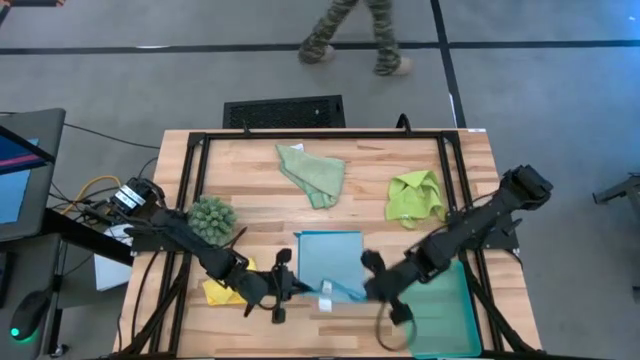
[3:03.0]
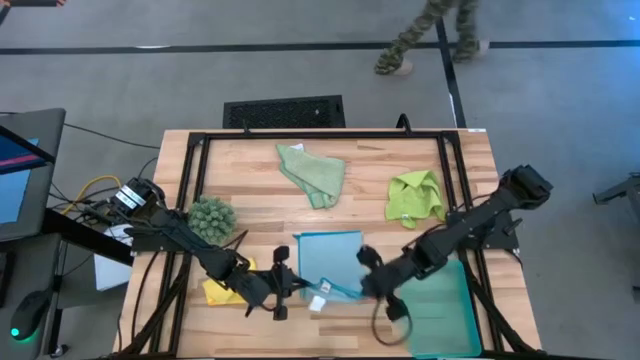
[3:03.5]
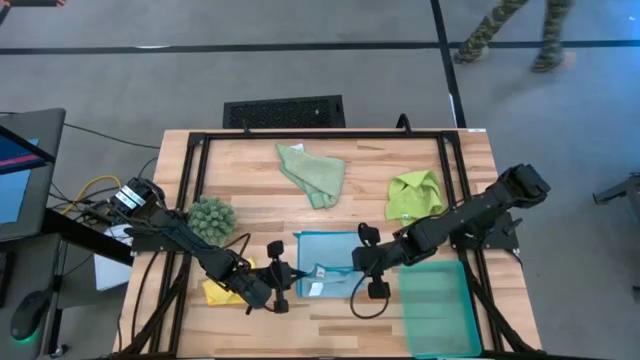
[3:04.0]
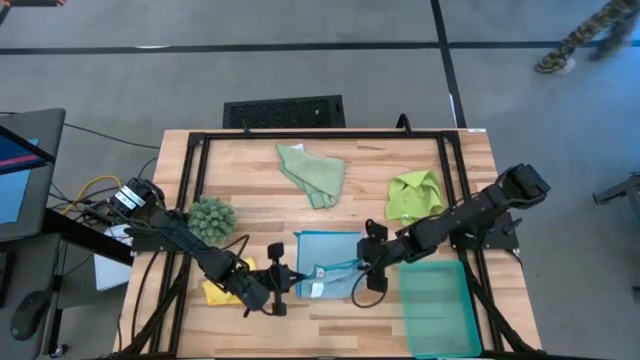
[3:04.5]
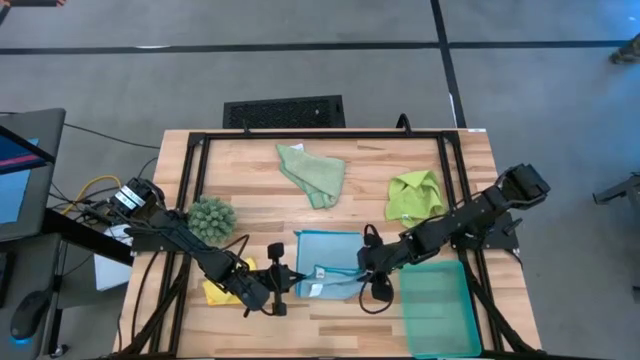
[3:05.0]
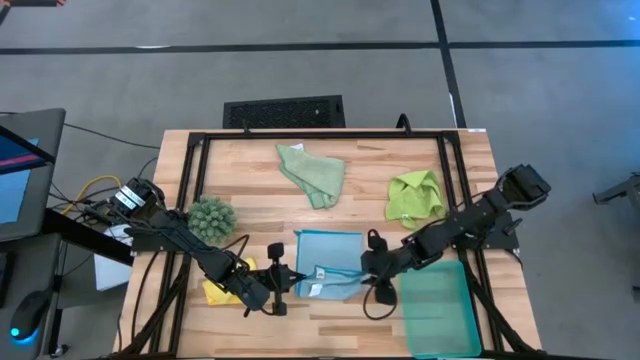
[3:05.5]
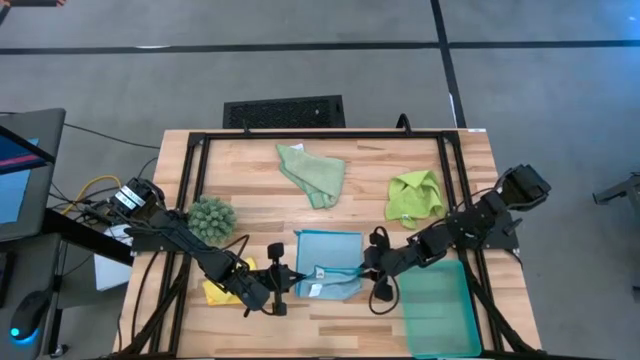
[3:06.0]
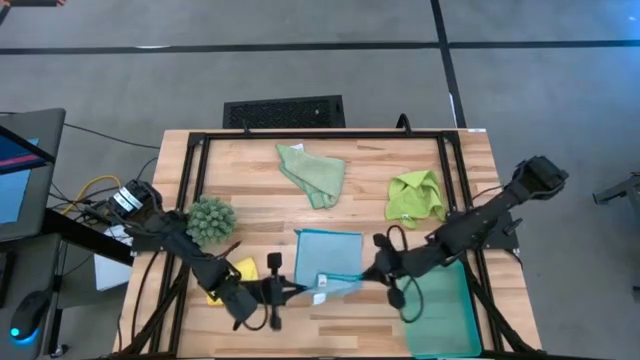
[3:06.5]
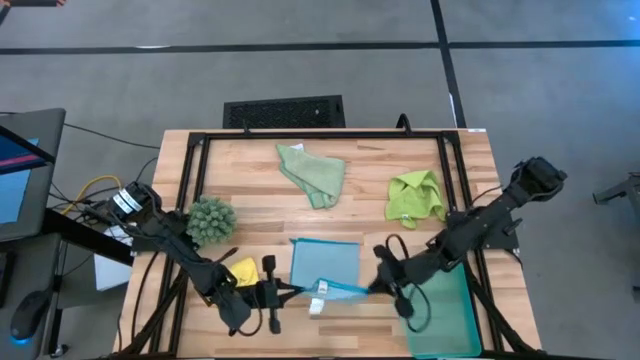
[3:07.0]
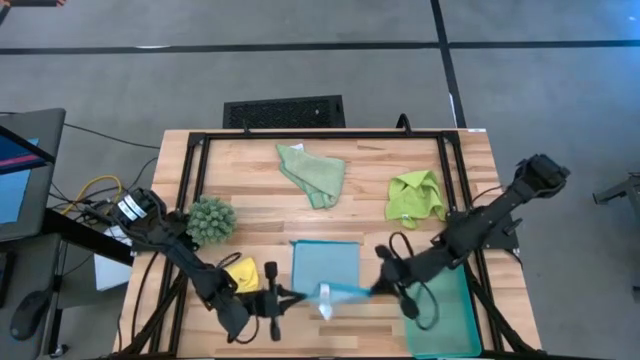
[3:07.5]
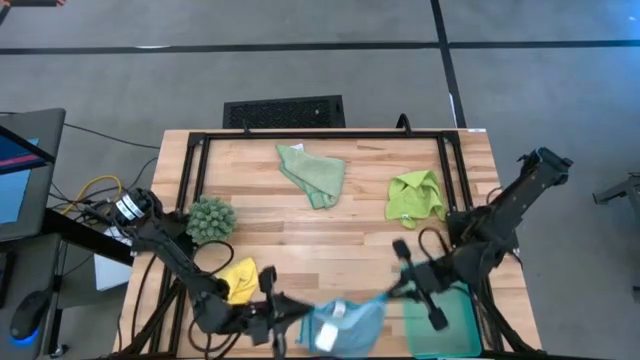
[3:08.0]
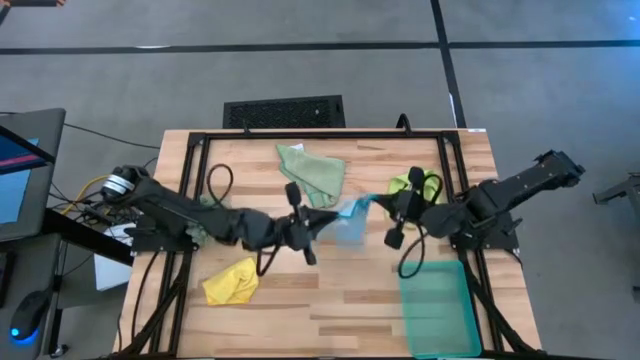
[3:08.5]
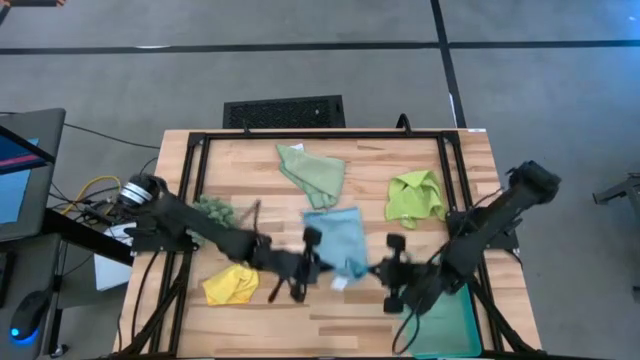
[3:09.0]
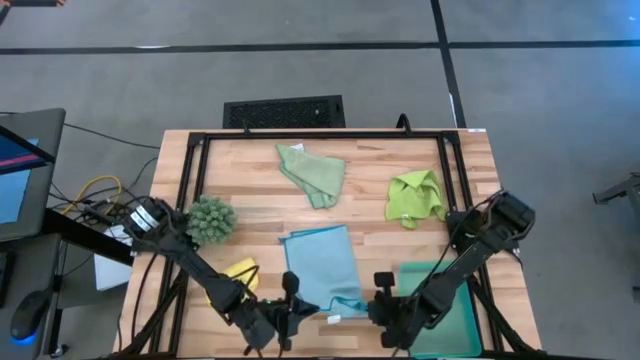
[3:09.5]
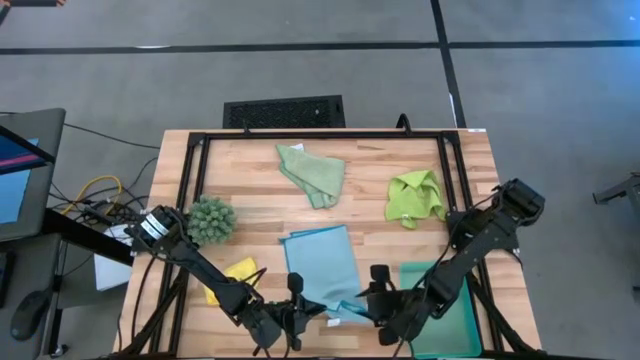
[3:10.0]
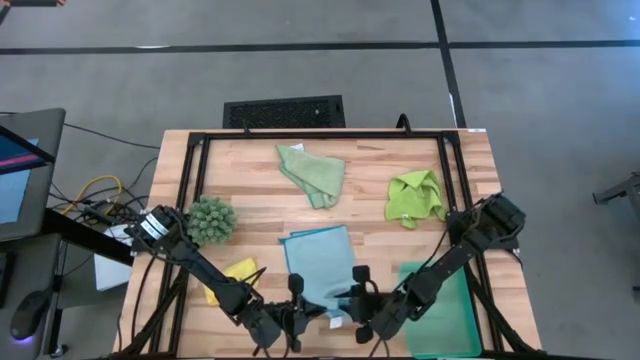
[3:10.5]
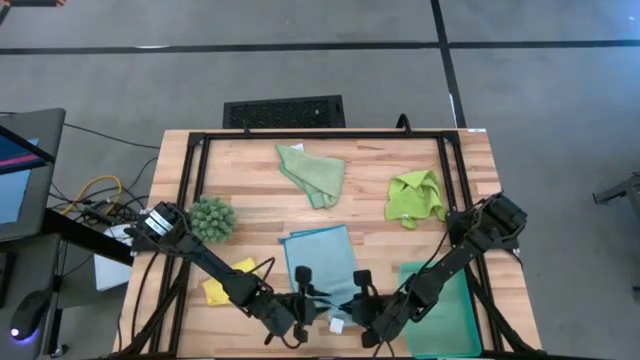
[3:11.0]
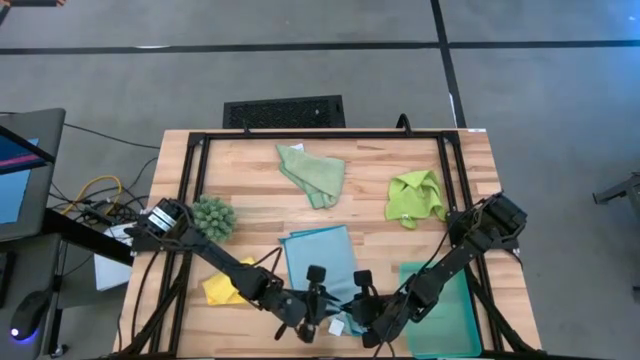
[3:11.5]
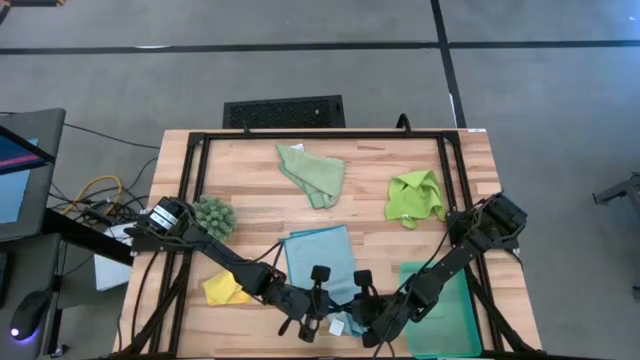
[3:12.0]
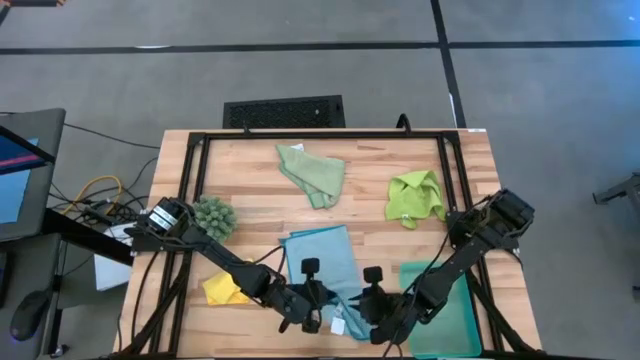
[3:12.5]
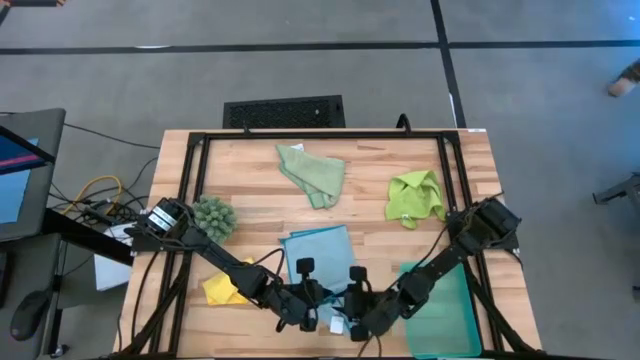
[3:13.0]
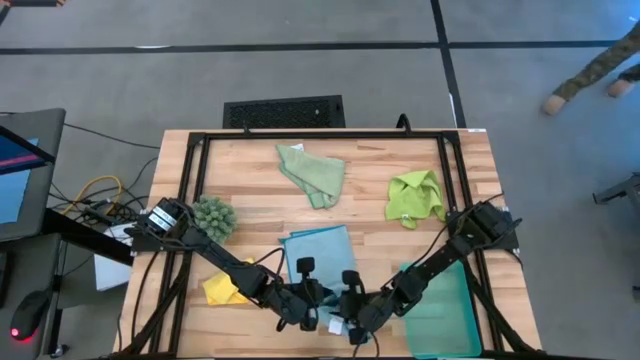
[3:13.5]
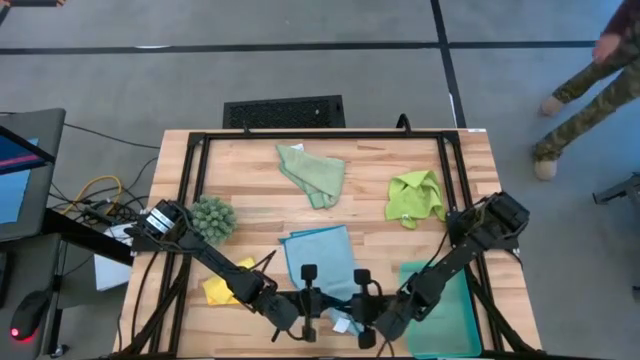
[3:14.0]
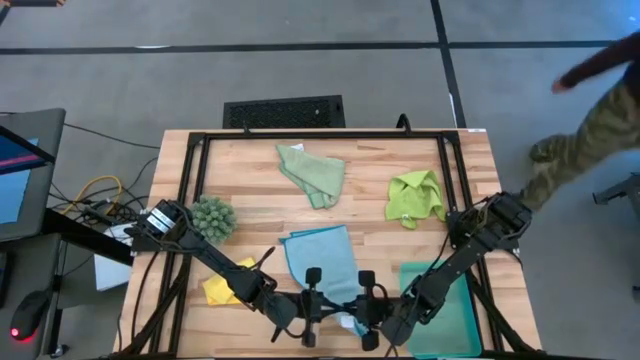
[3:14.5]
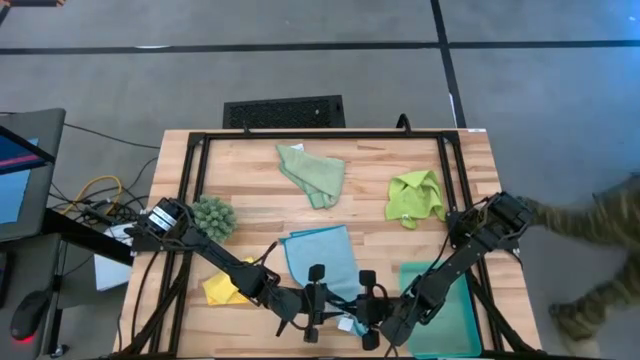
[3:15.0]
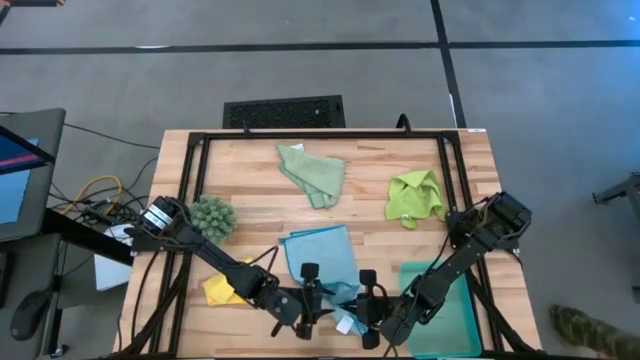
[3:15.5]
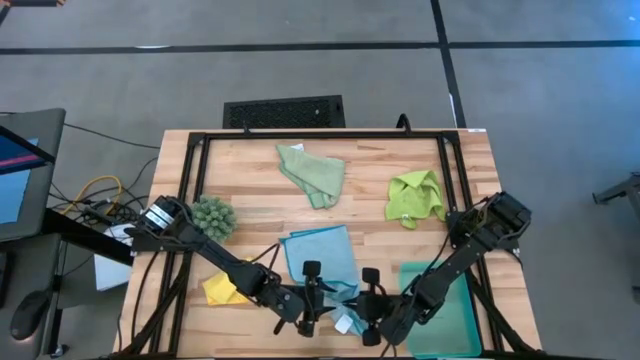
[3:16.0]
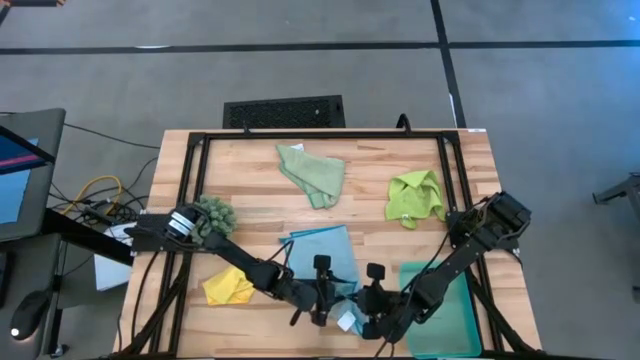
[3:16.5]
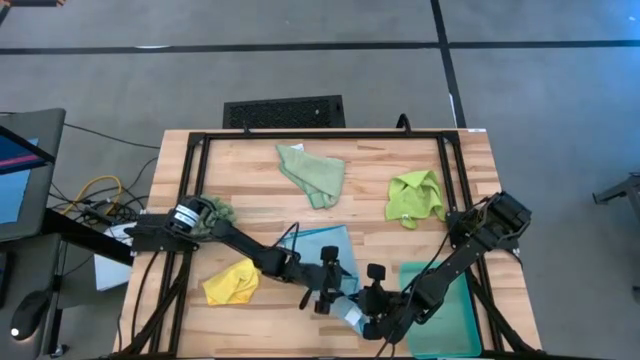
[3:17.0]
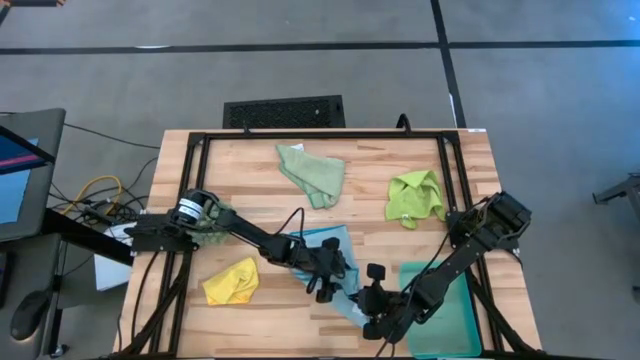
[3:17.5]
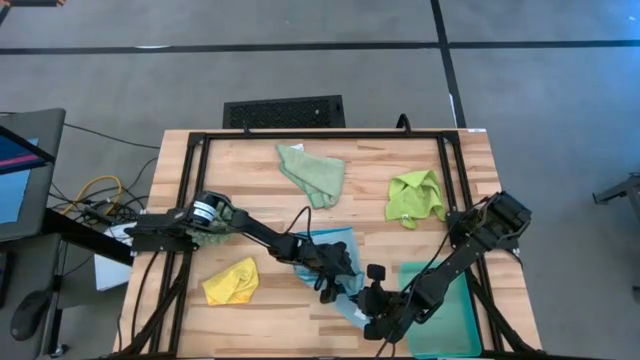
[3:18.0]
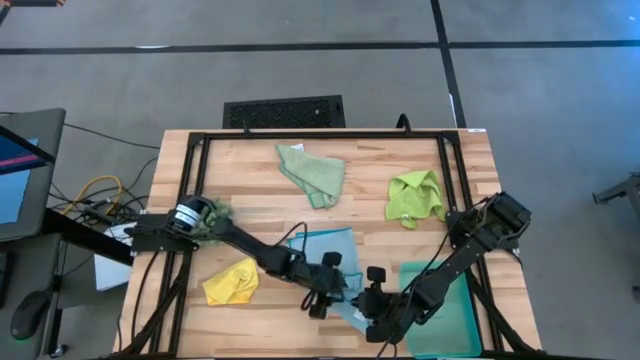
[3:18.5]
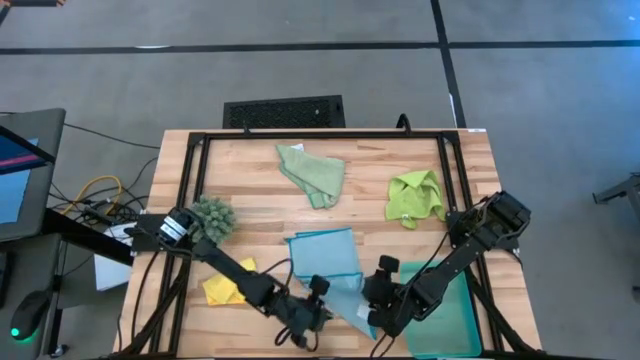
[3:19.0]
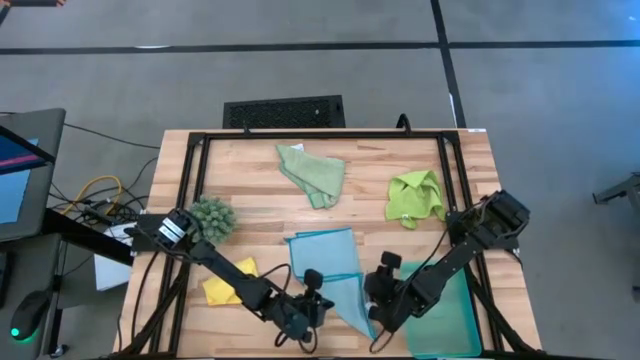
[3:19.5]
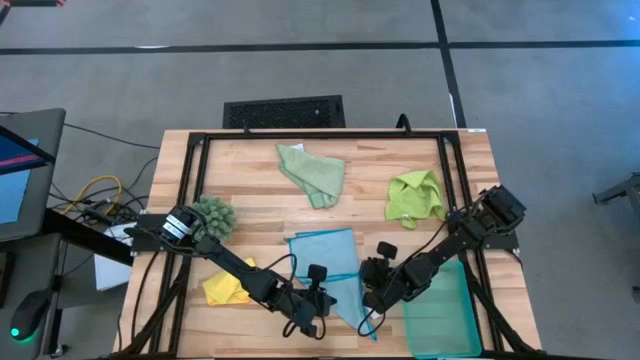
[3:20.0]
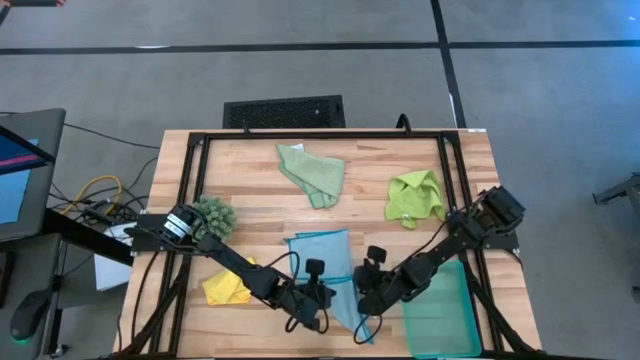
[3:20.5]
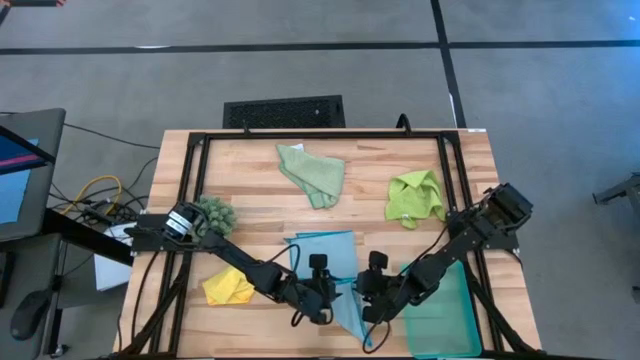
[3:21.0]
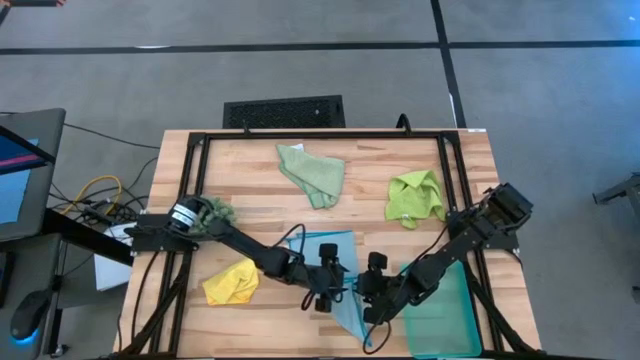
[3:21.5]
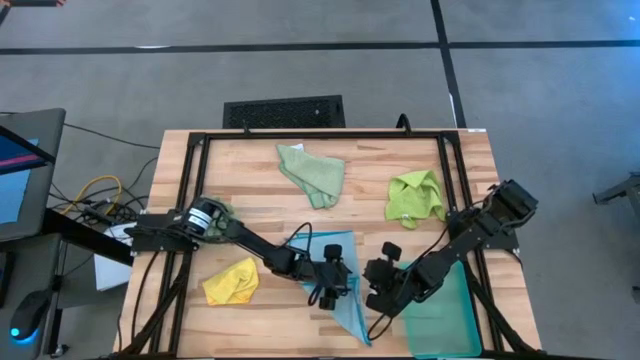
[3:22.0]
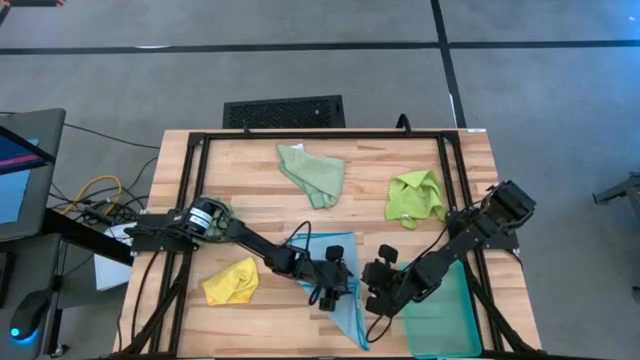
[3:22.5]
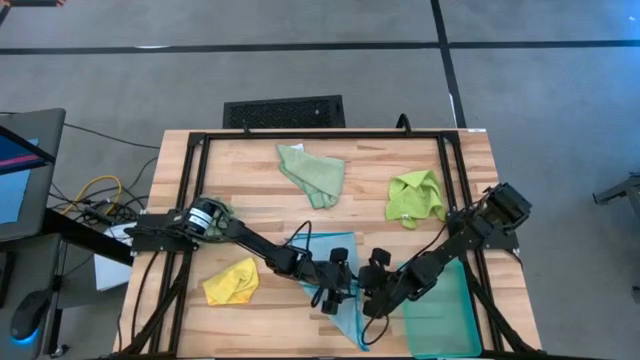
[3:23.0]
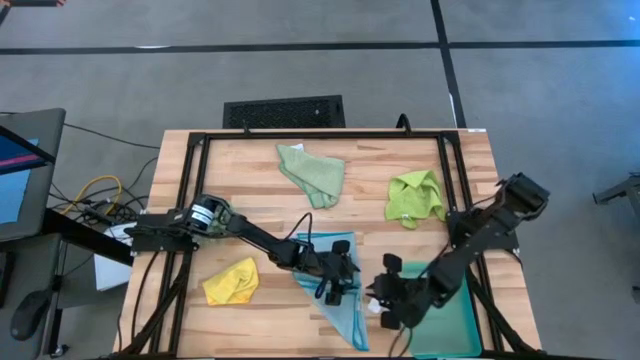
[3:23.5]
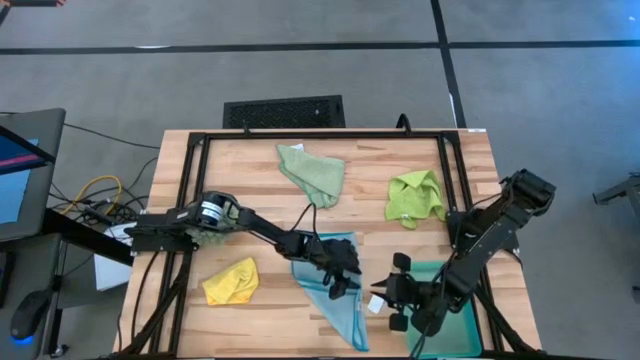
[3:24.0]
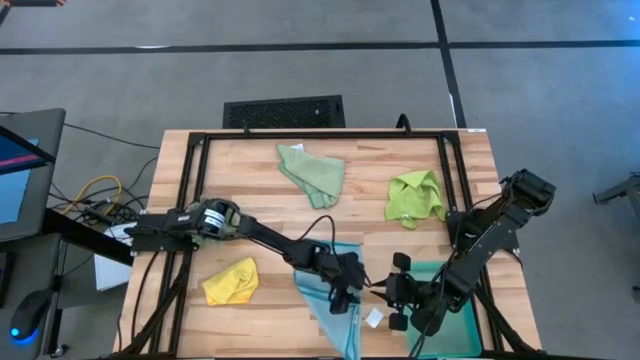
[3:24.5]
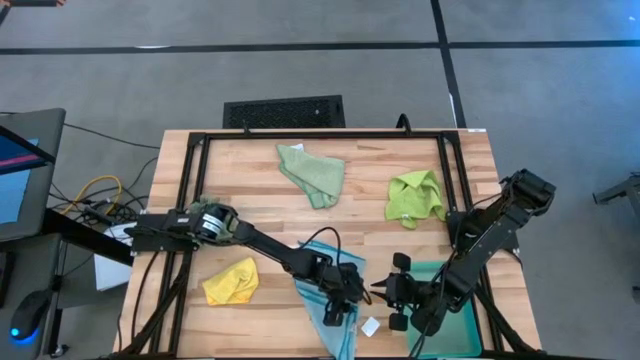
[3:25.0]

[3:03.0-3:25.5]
Task: Fold microfiber towels
Fold the blue microfiber cloth
